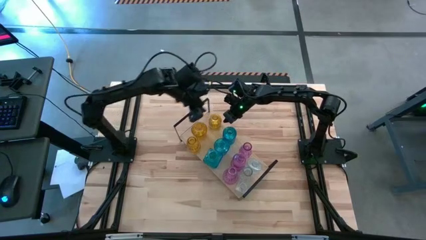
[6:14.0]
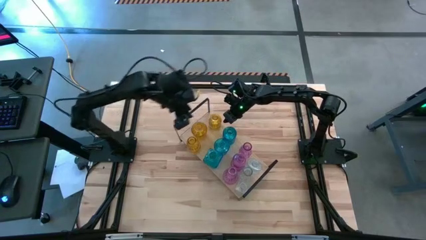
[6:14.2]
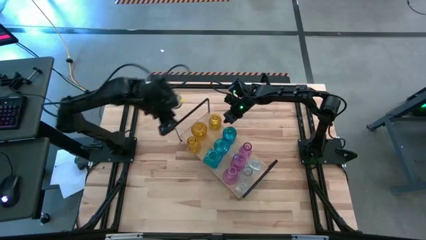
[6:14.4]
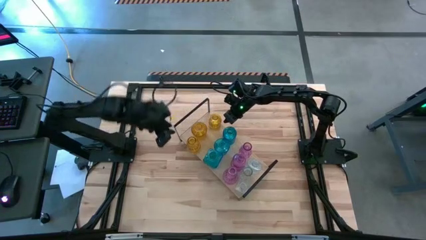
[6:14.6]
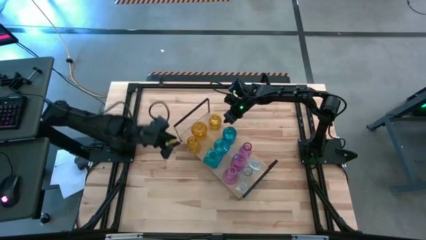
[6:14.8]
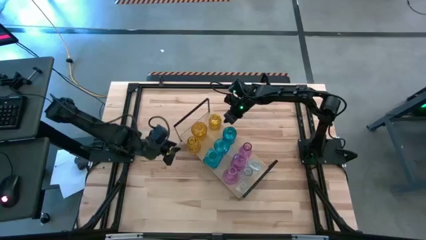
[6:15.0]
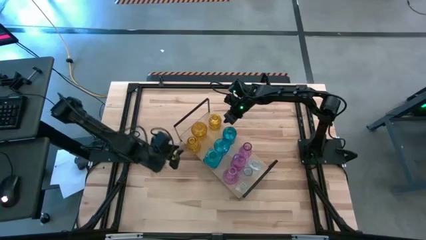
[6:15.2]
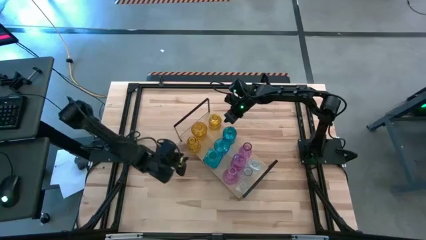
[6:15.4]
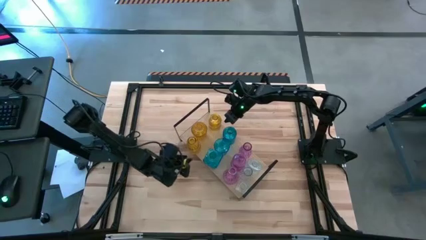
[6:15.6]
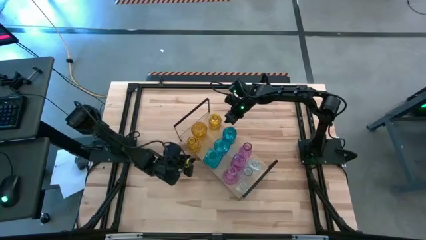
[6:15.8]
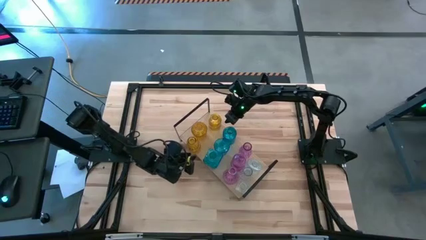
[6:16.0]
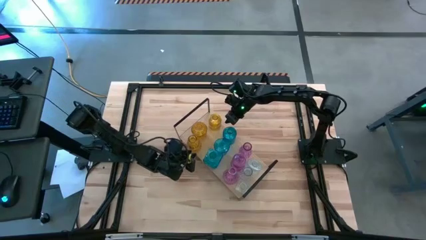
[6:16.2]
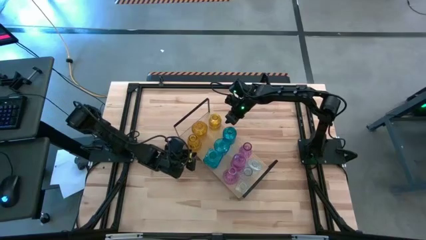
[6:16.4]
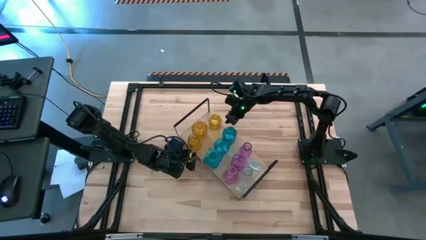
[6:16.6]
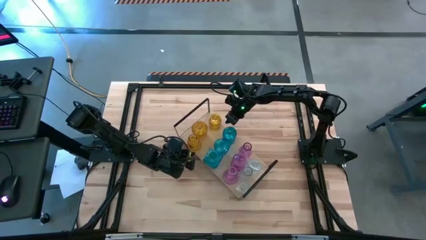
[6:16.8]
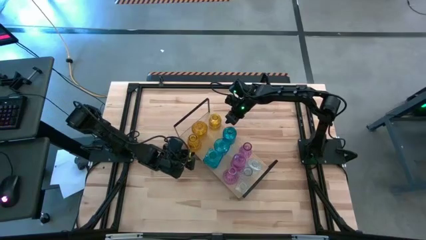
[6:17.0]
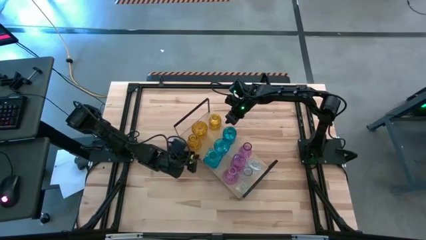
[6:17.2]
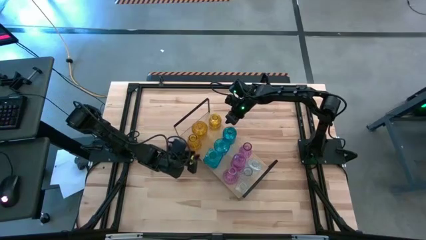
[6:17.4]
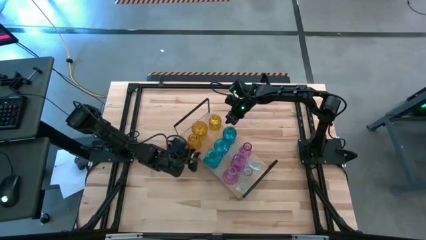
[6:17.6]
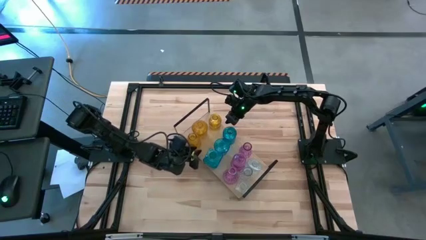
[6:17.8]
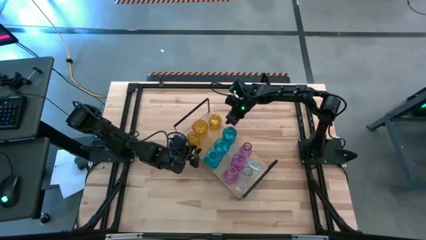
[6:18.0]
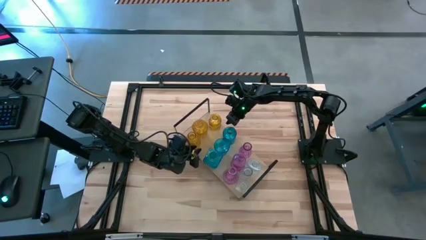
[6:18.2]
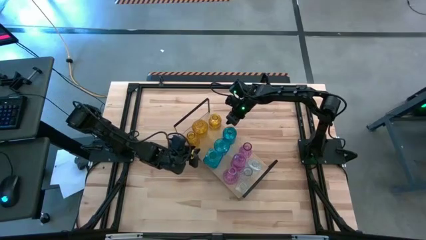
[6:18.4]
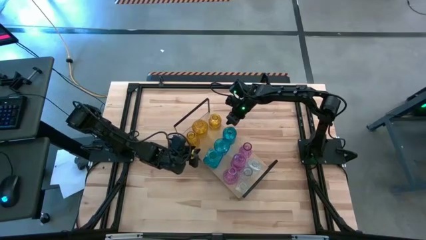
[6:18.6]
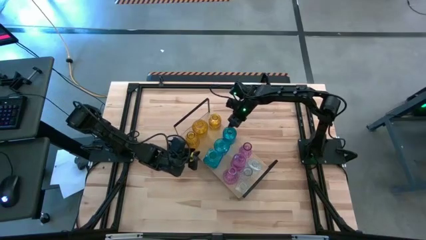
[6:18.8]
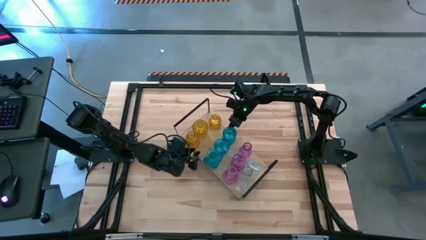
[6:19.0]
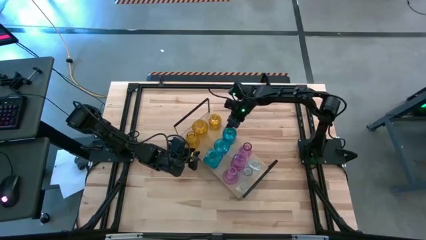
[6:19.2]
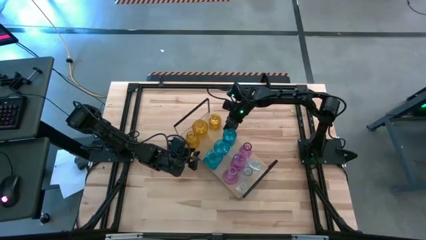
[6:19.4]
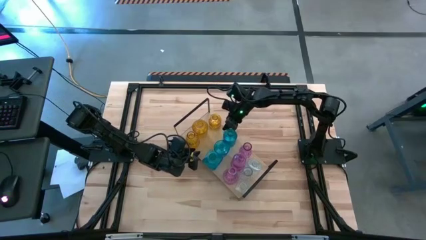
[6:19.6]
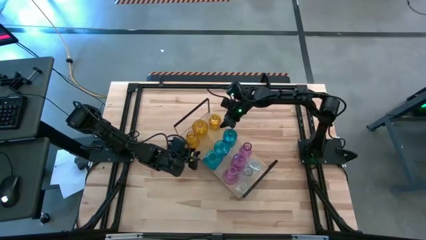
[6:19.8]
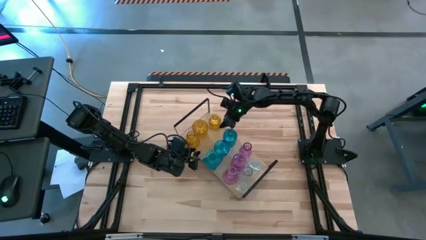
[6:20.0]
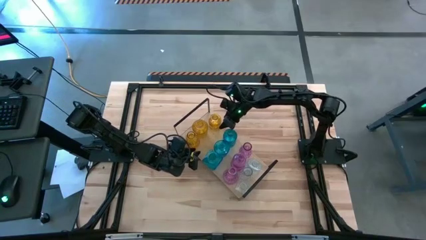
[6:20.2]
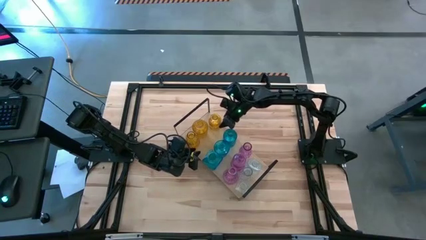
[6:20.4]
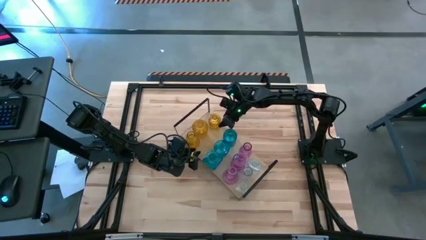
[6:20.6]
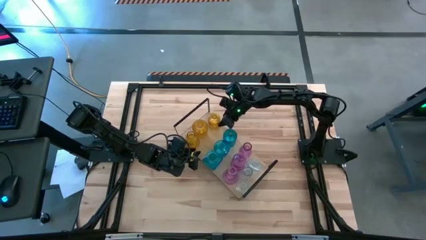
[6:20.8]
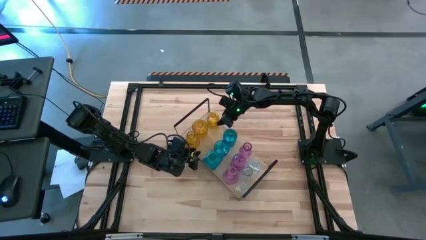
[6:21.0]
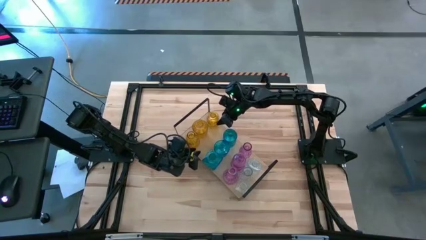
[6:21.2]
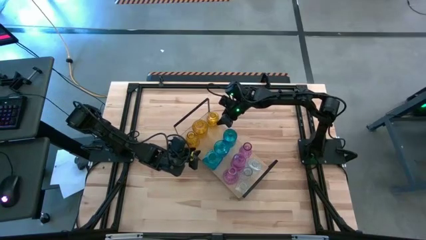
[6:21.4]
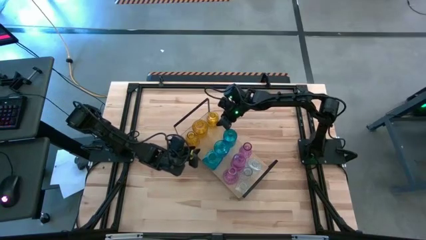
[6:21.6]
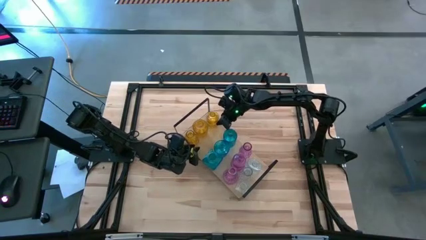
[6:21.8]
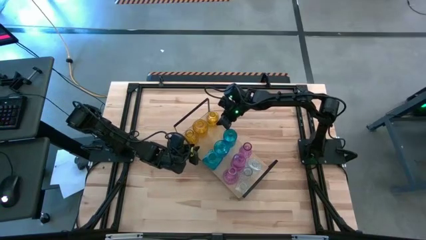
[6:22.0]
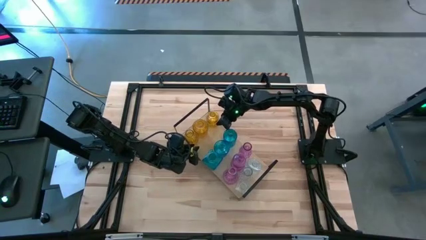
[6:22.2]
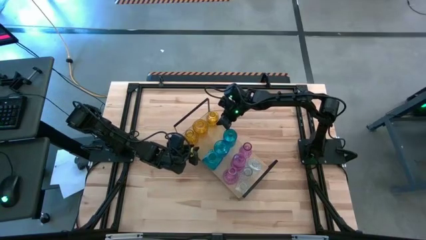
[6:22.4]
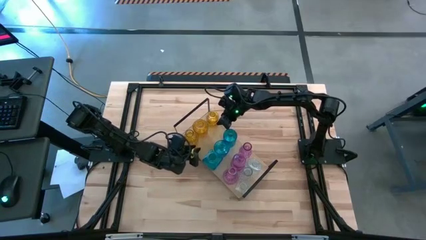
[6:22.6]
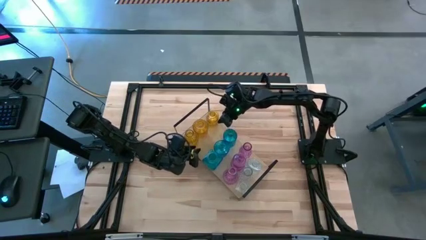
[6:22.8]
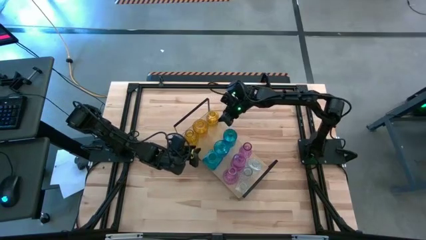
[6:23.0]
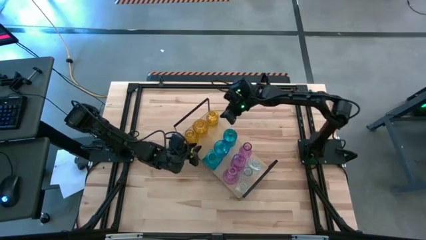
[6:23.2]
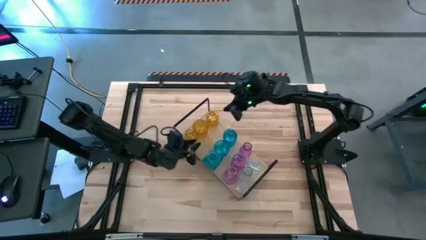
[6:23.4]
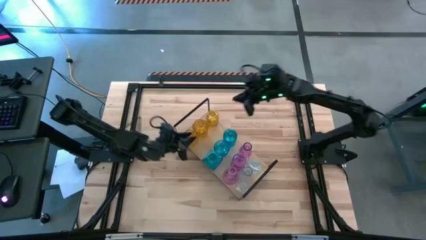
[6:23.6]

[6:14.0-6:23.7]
Task: sort vases onto shelf
Adjust the yellow crystal vases
